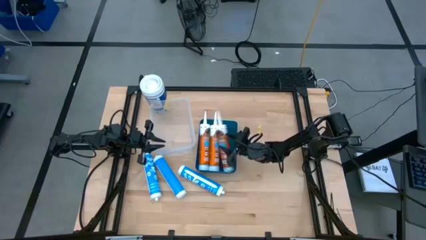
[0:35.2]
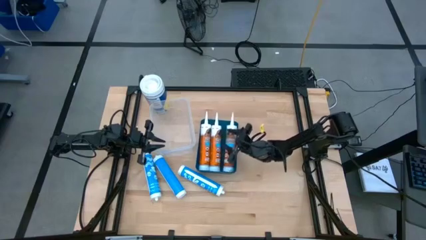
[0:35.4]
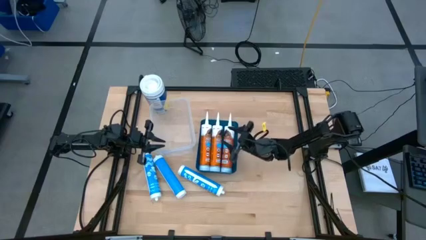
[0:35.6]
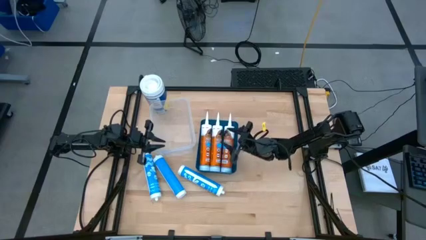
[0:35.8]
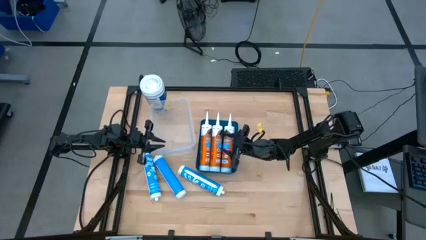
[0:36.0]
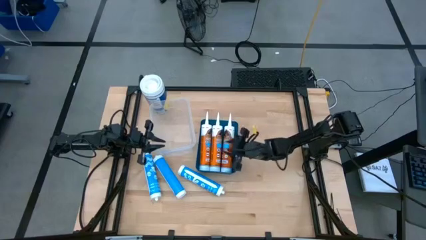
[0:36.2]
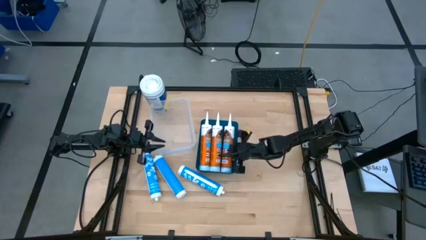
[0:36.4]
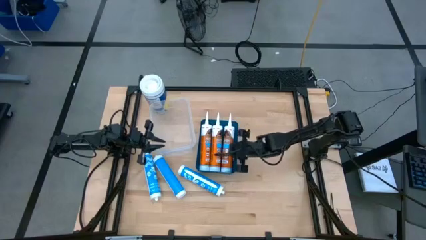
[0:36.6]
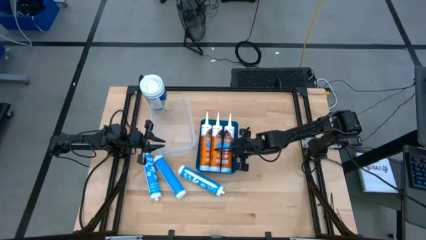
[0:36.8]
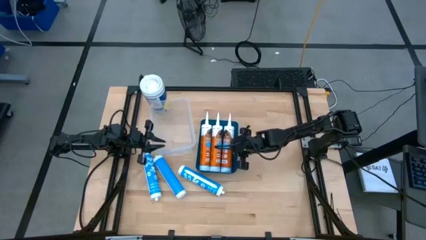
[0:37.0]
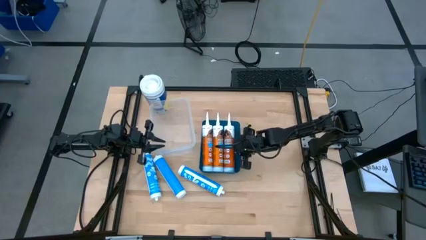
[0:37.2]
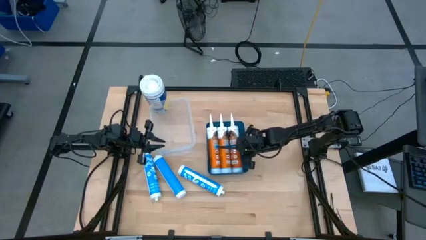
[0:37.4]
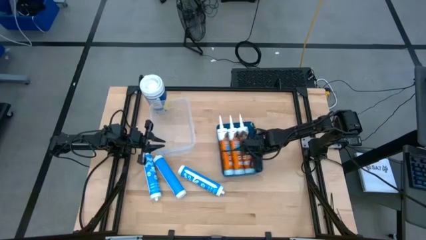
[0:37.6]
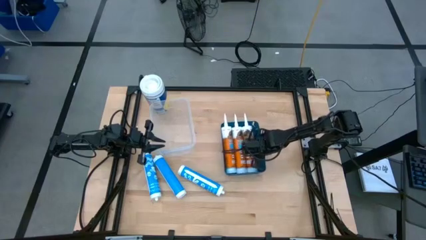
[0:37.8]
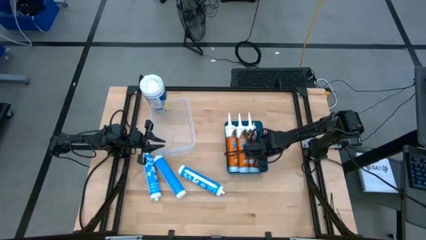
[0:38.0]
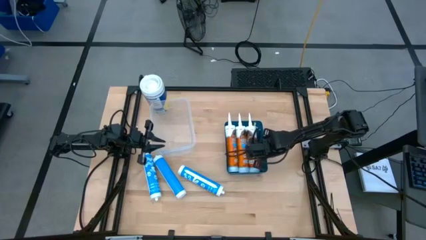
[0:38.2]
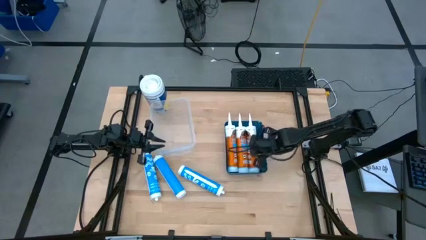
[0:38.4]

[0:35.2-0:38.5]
Task: Pick & place silicon tubes, Sealant and Lysol wipes
Adjust the blue bin

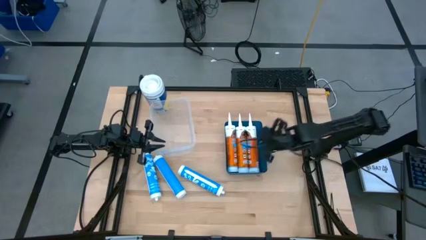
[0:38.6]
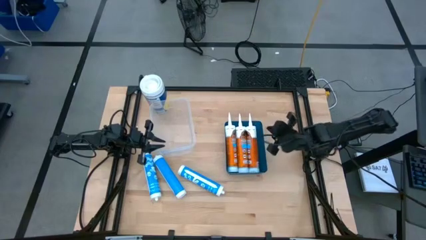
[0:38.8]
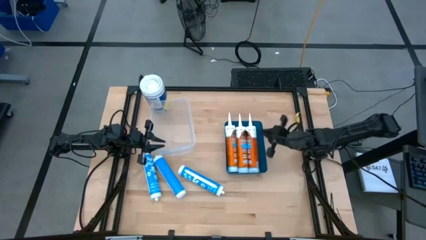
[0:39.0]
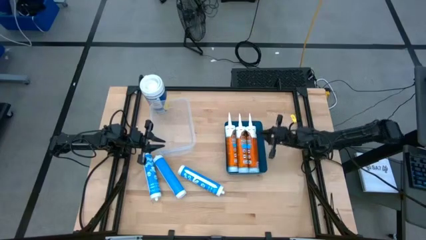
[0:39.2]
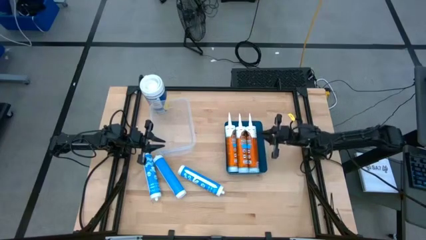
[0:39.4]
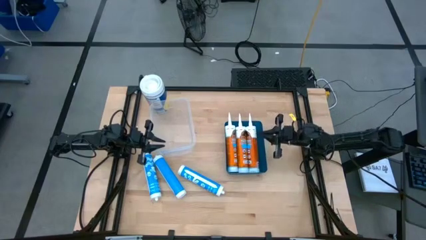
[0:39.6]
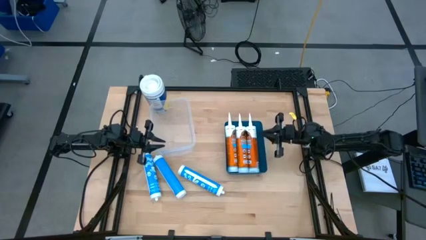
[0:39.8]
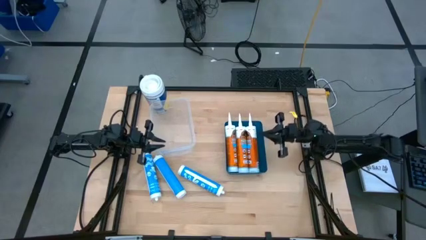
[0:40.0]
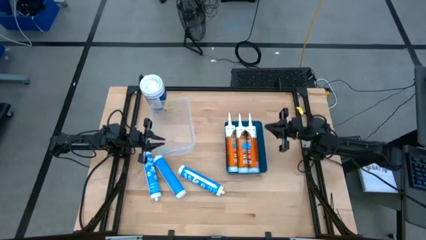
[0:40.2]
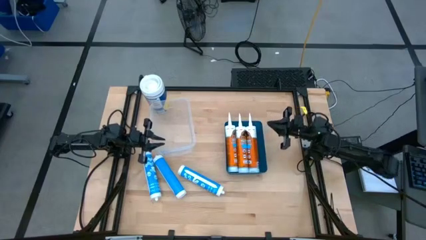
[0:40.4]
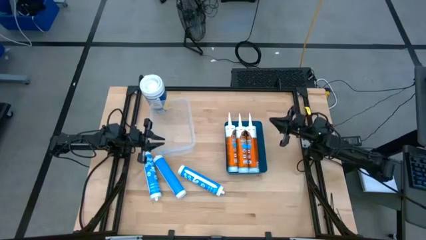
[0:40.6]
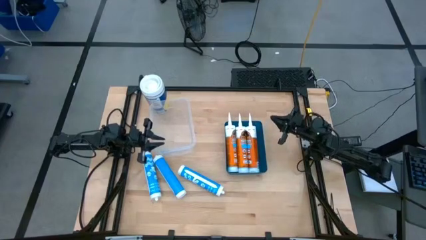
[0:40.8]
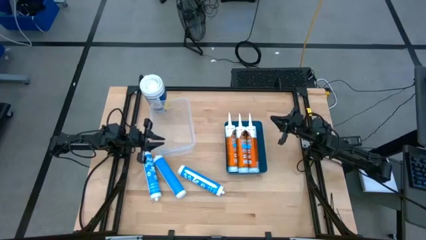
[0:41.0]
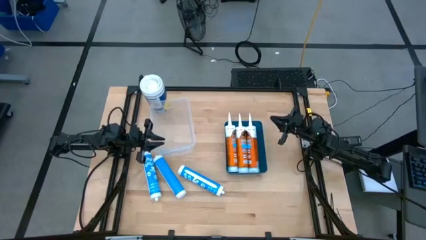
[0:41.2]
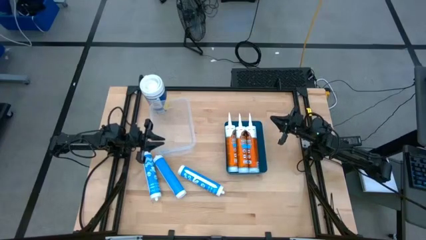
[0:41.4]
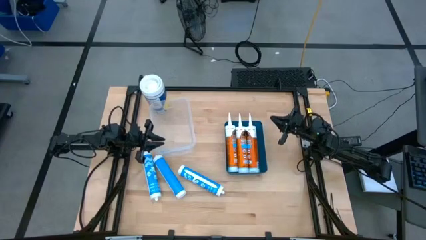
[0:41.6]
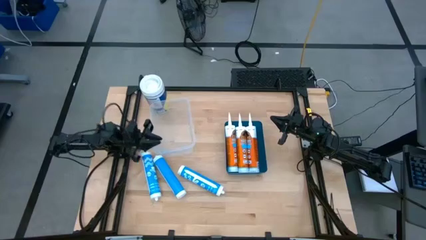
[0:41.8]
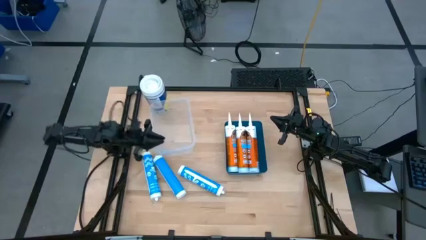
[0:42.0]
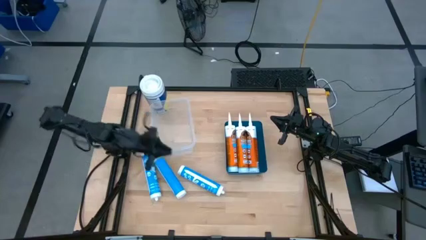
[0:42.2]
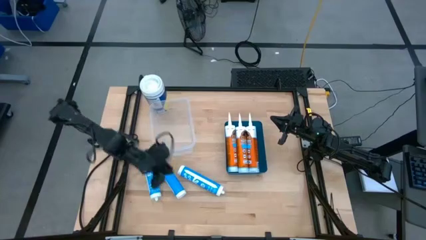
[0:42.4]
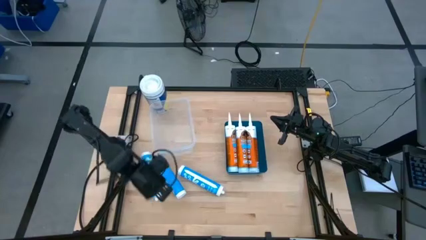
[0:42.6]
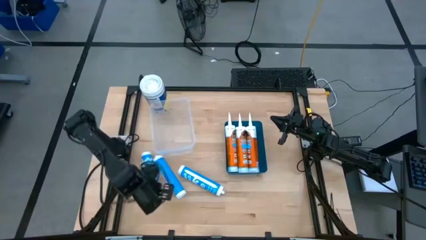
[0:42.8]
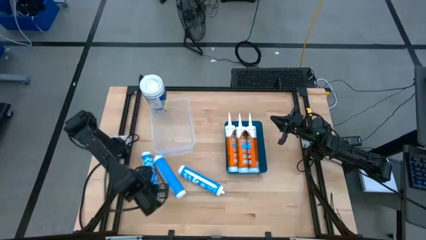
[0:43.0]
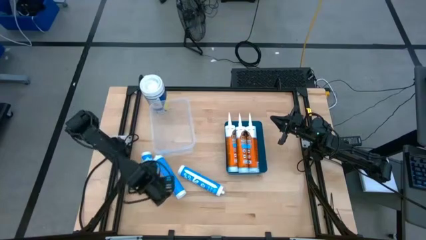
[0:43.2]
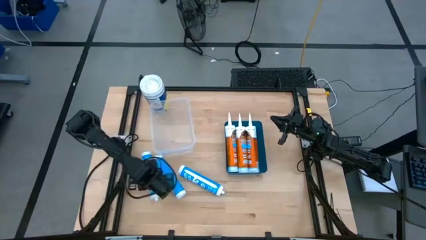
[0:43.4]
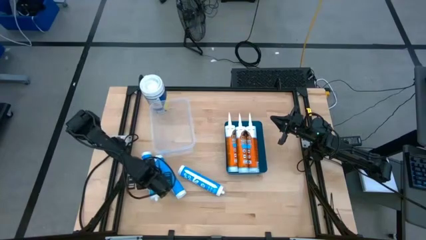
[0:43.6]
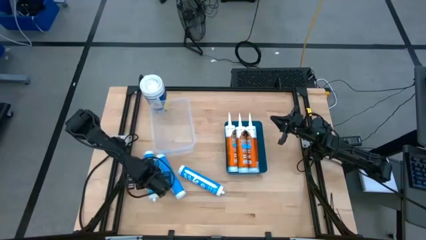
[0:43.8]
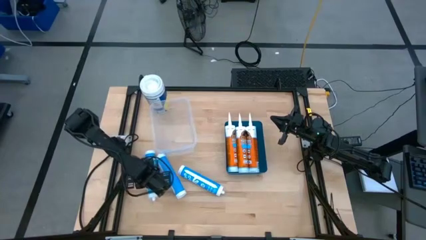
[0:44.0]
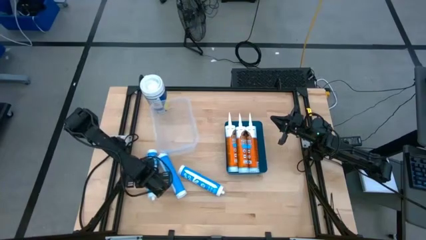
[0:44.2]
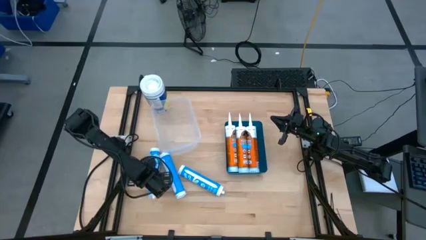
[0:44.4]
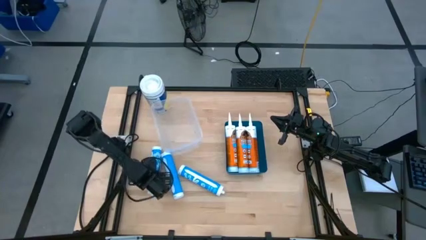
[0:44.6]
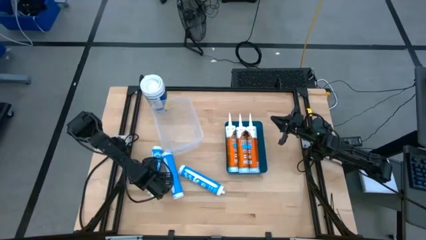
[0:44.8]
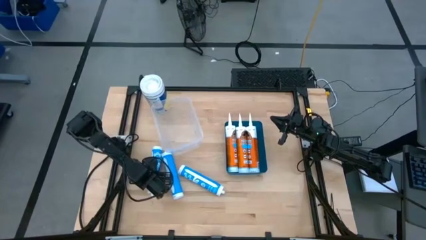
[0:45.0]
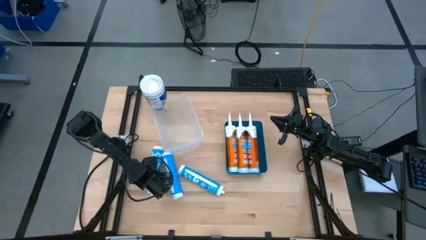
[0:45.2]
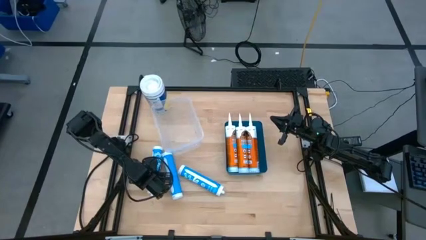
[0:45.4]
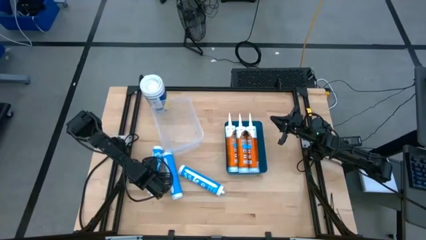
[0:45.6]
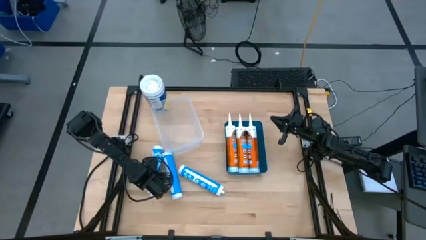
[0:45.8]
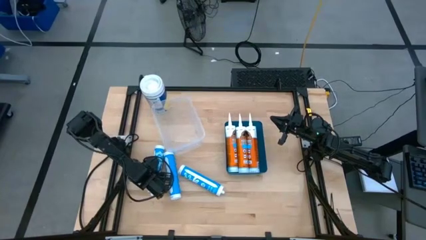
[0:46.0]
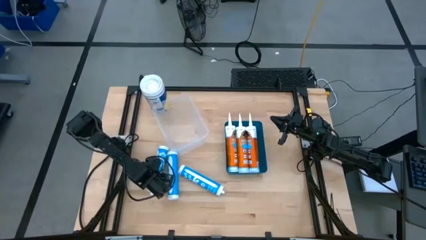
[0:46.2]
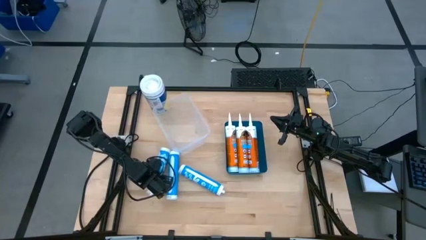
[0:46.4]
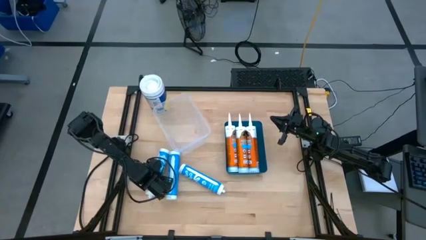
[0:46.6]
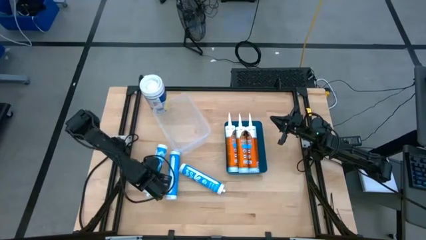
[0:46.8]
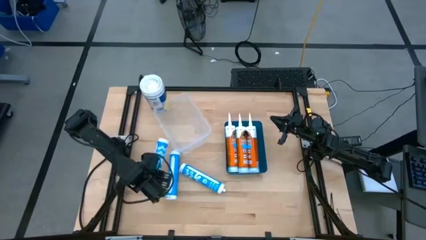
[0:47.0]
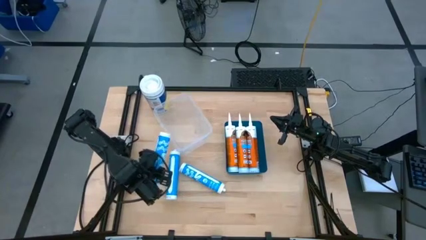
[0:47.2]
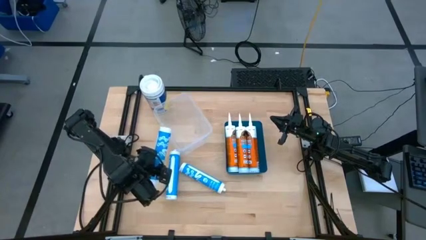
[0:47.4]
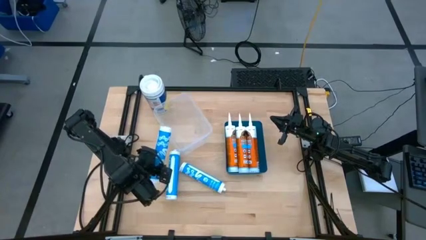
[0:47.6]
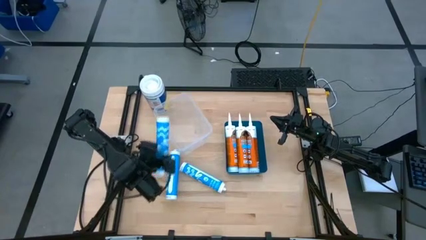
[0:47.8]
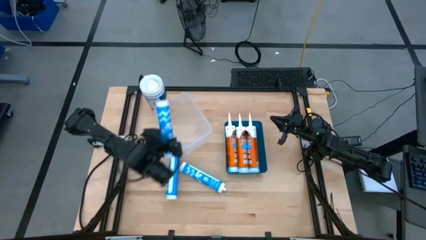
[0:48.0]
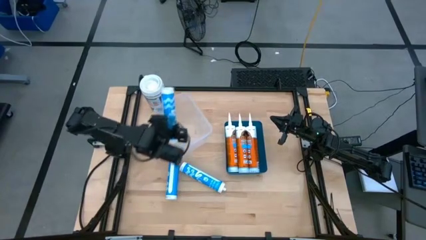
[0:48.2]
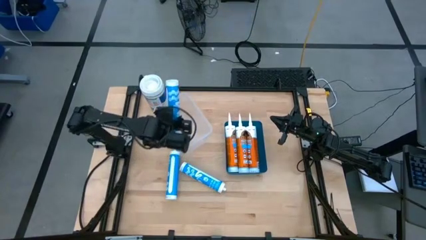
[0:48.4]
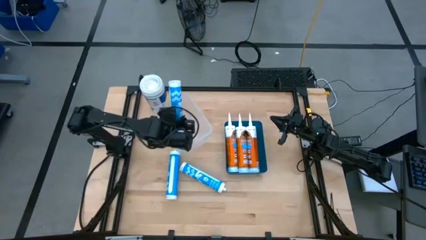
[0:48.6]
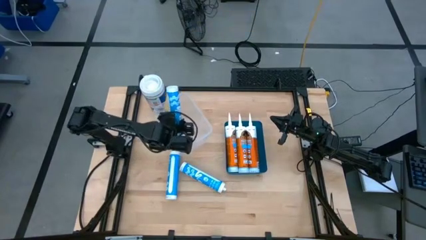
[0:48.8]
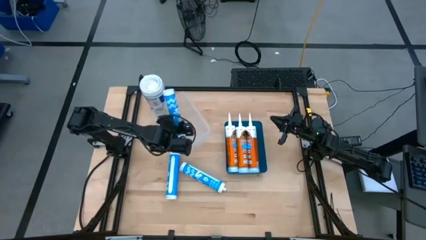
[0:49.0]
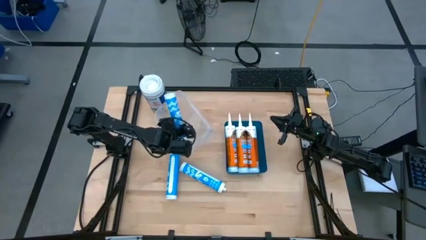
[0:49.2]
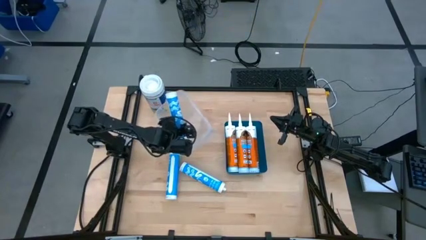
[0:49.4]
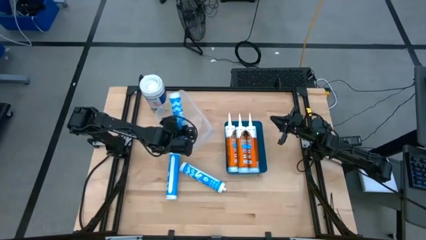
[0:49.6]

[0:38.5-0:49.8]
Put the left blue sealant into the transparent bin
